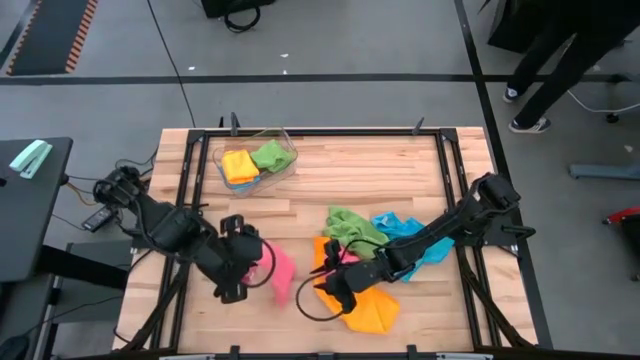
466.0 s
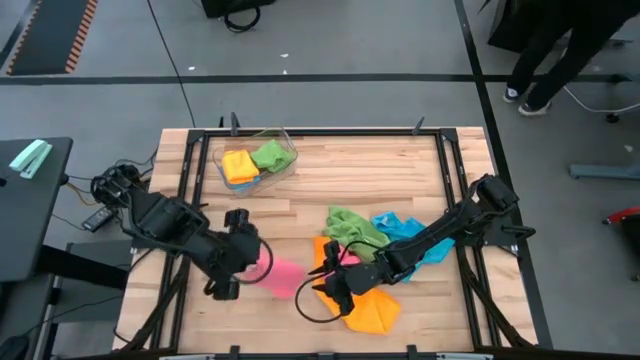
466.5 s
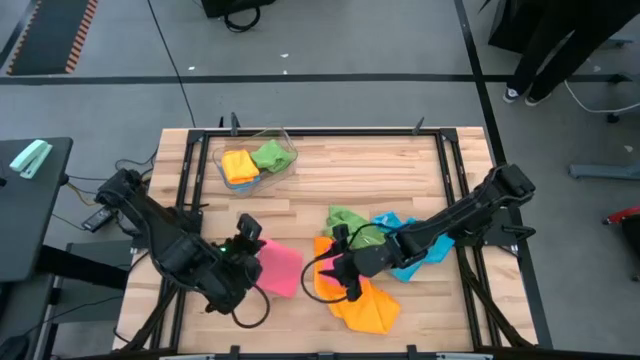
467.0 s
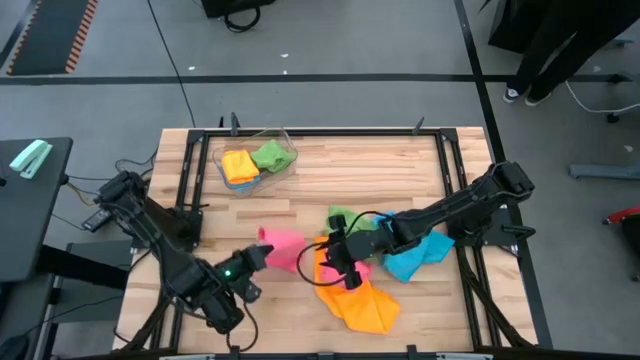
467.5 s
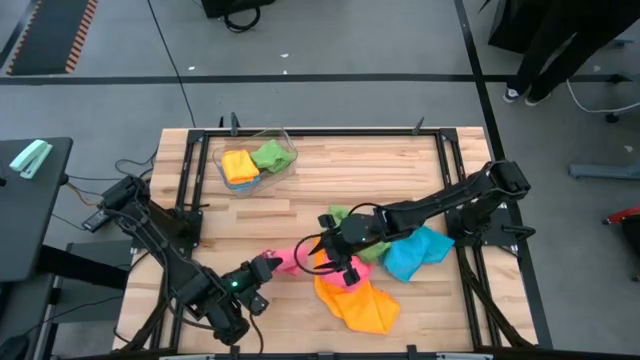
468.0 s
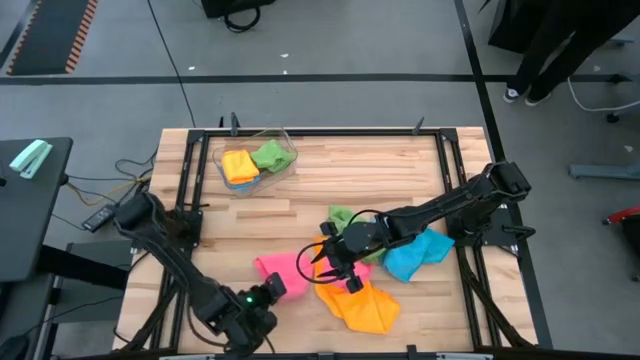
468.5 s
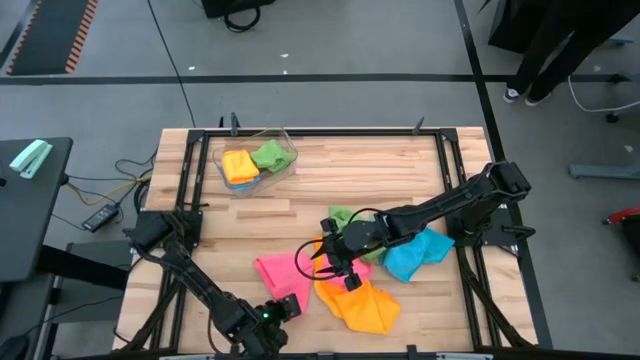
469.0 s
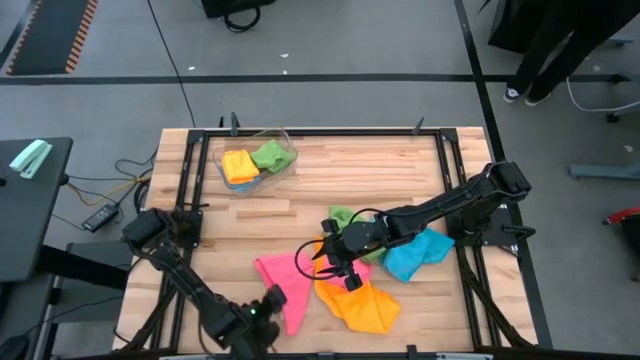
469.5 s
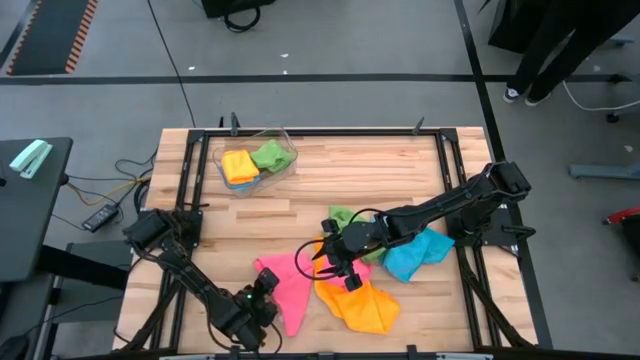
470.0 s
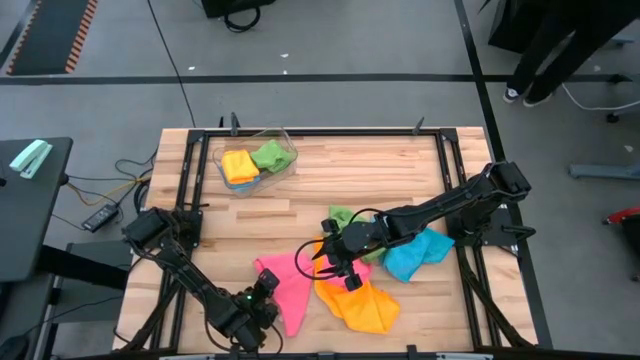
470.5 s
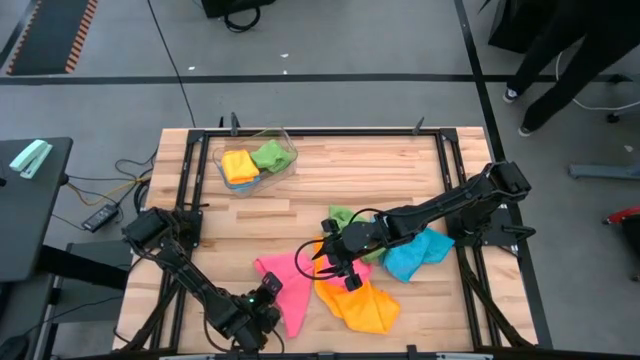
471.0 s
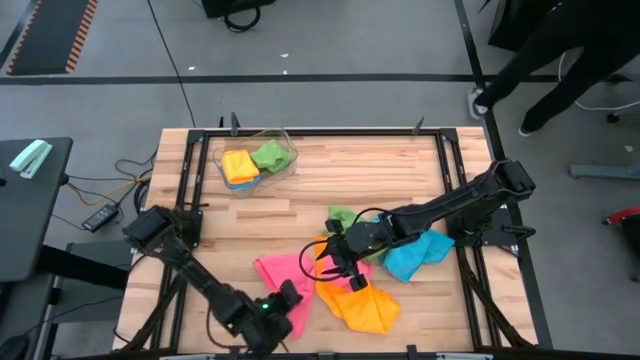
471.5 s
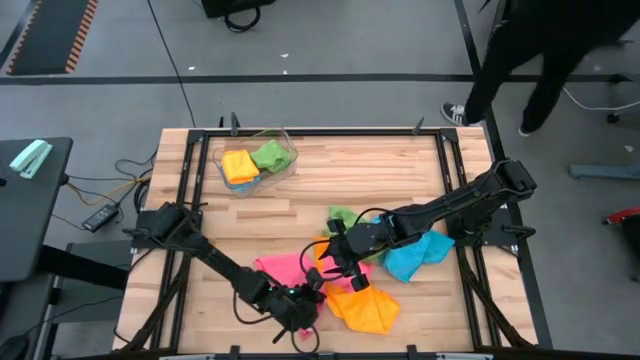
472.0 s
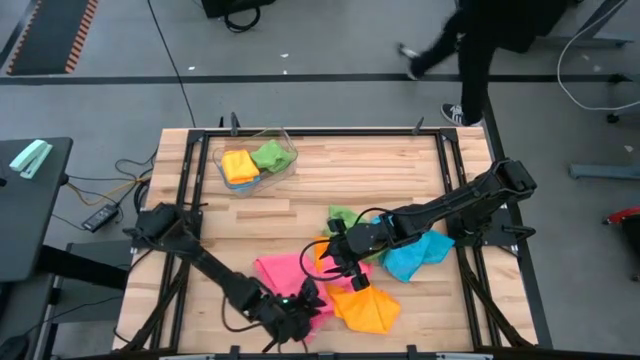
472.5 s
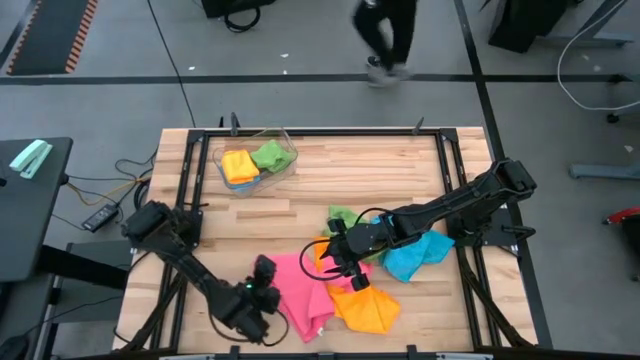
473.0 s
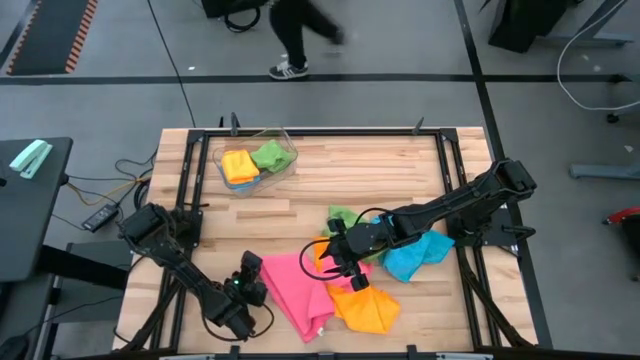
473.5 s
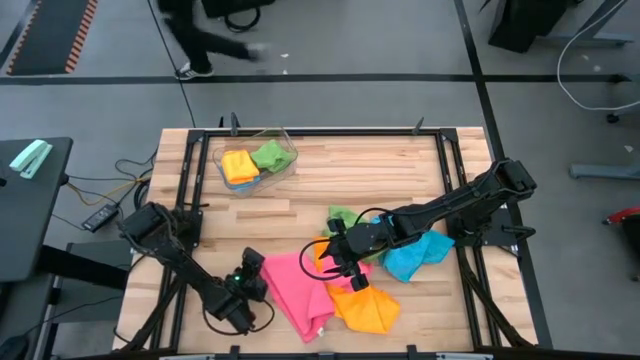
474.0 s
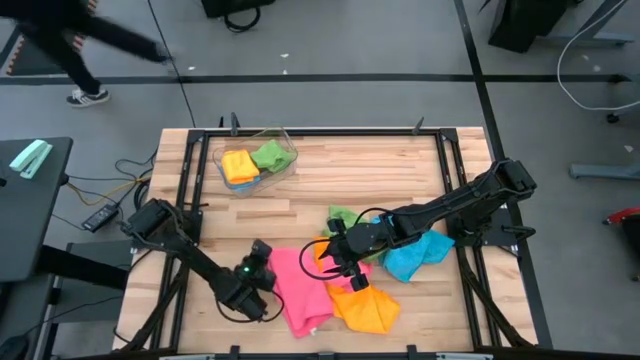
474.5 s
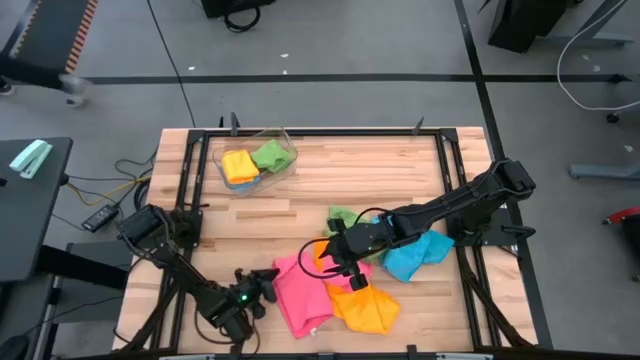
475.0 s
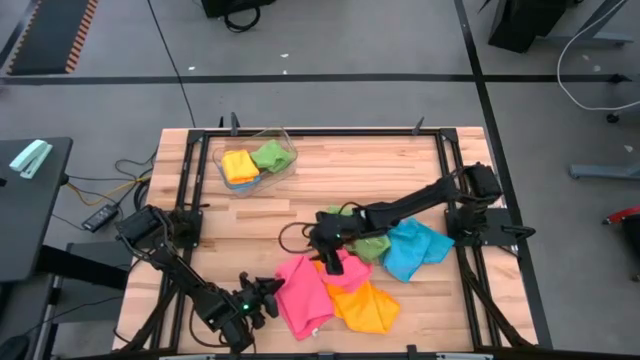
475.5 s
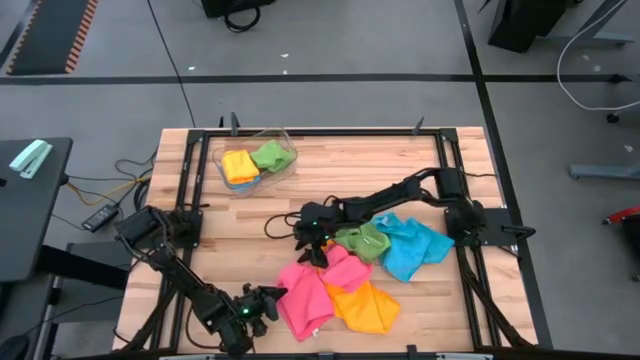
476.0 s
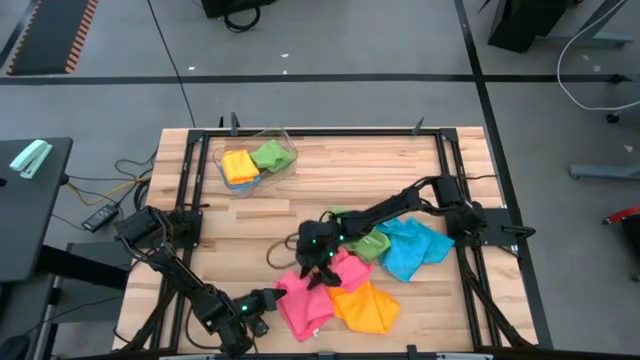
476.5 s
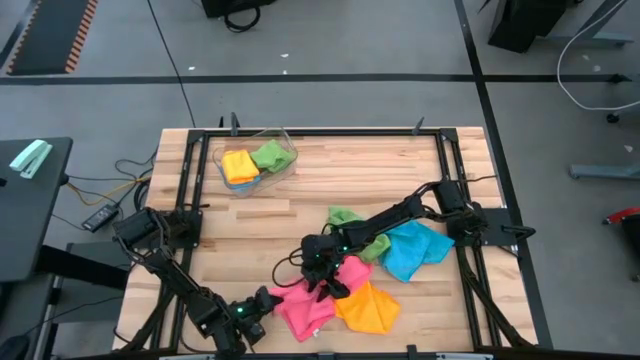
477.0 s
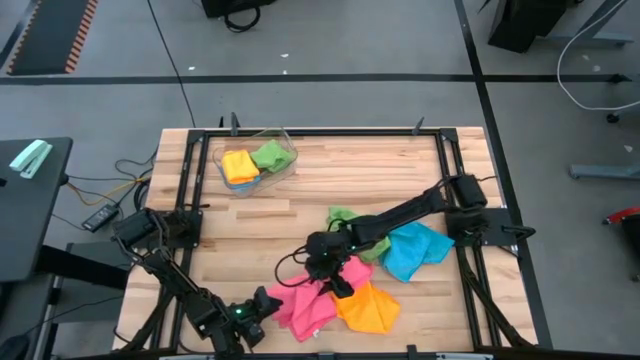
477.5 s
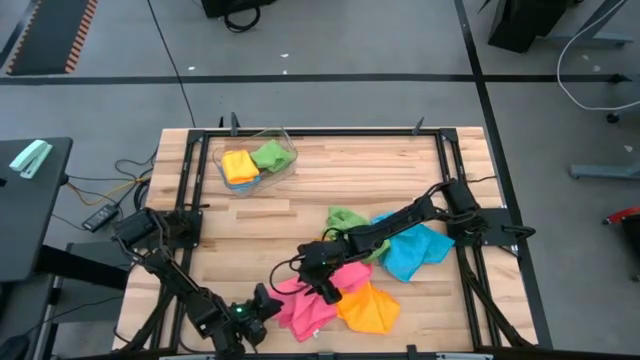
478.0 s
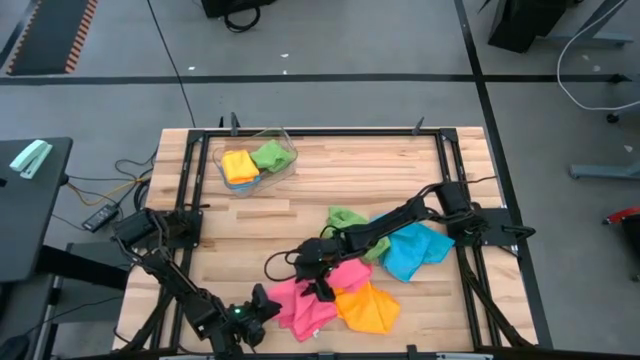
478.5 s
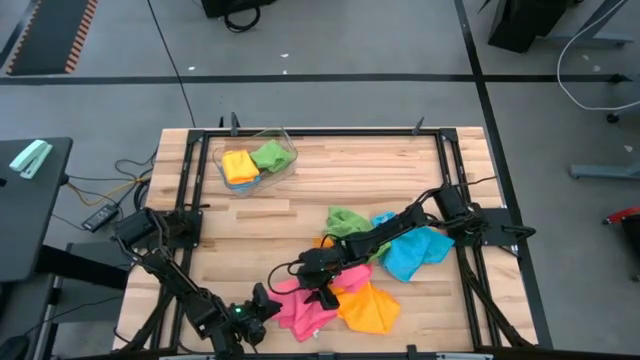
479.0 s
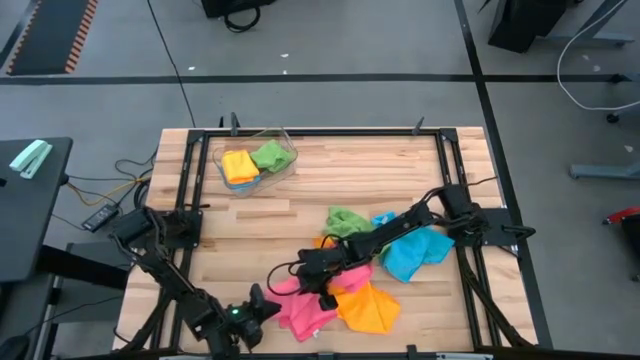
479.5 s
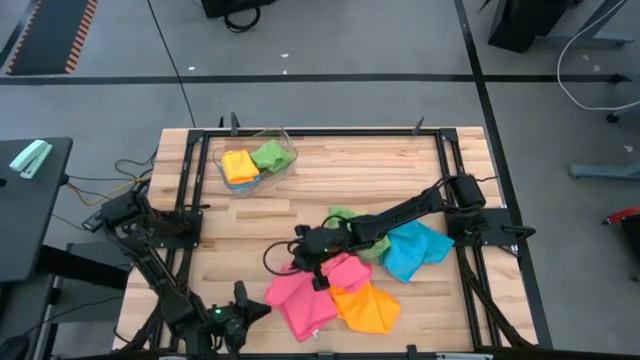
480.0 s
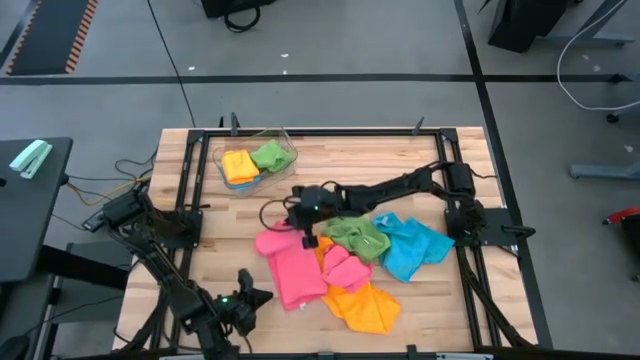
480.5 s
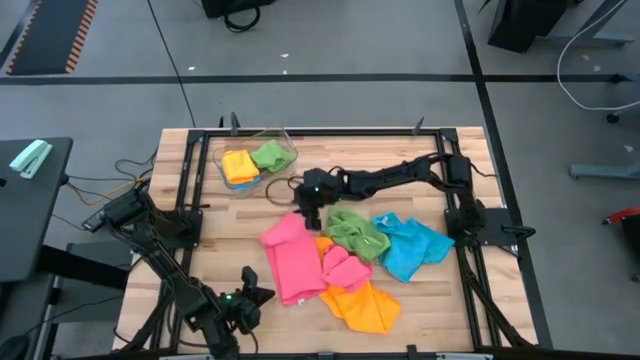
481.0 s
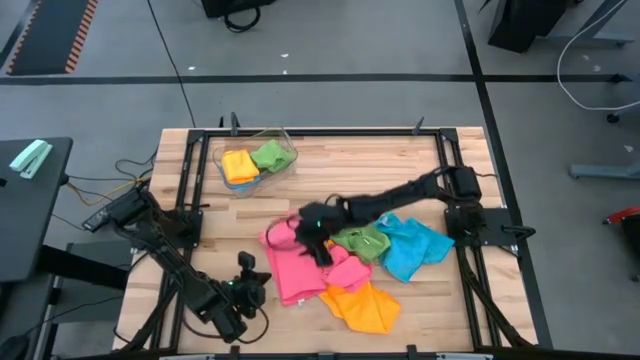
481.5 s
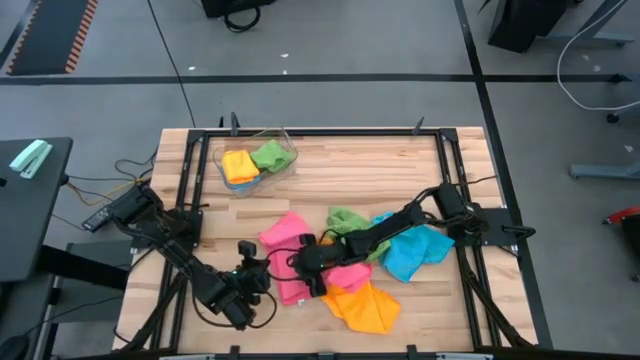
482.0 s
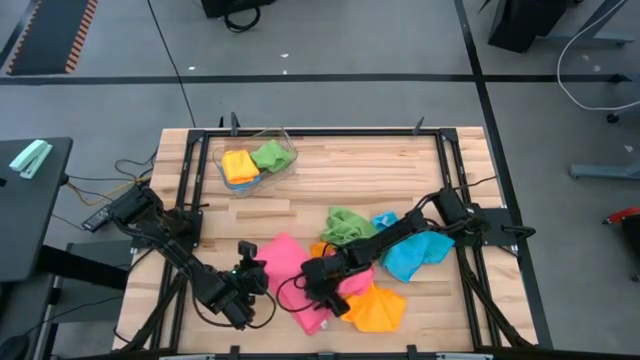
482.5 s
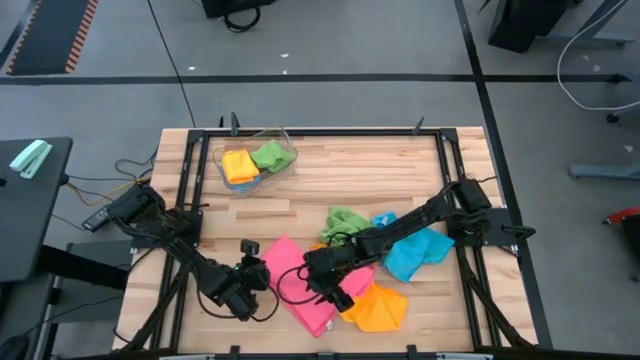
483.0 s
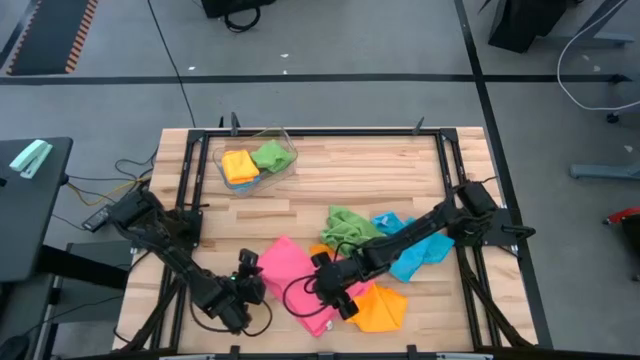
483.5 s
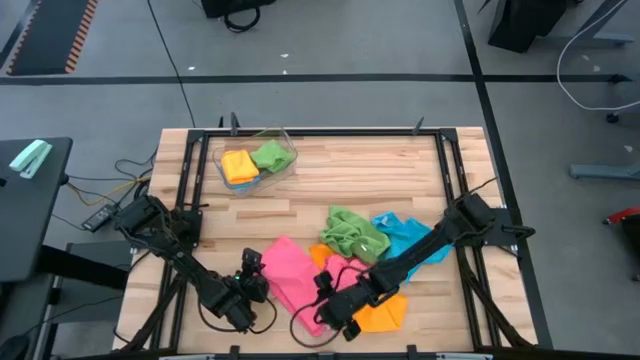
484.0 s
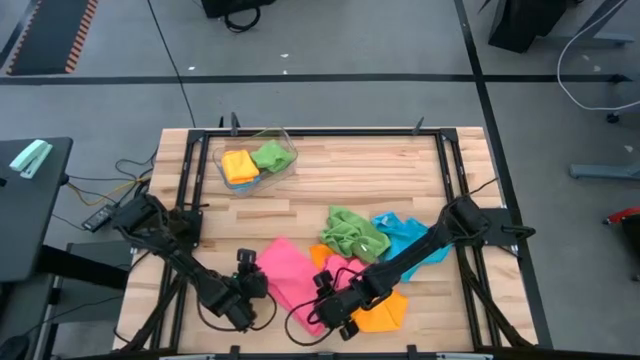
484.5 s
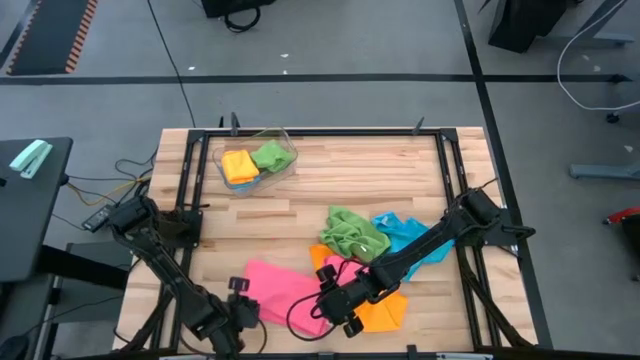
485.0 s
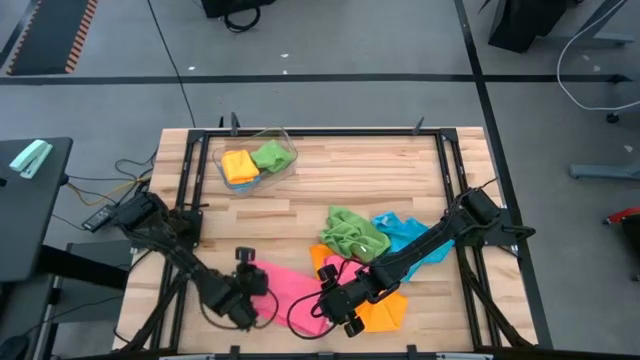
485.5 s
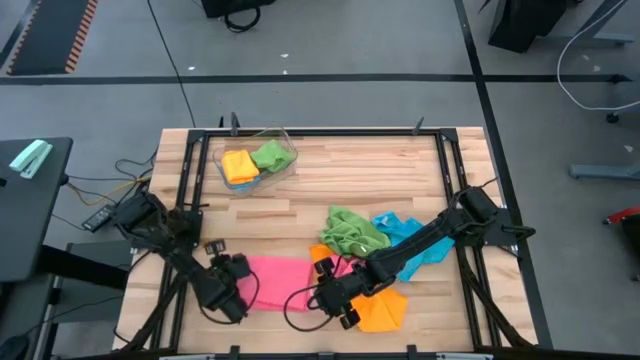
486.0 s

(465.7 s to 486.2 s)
Task: Fold microfiber towels
Fold the left pink microfiber towel
